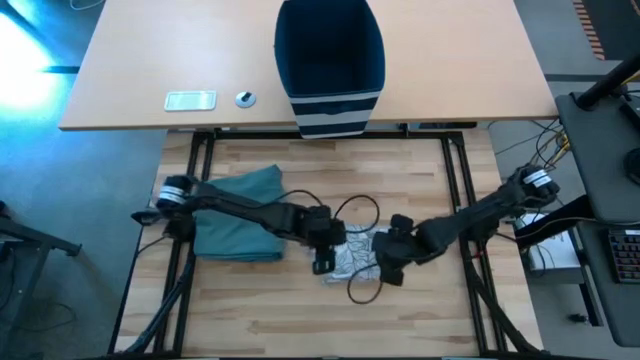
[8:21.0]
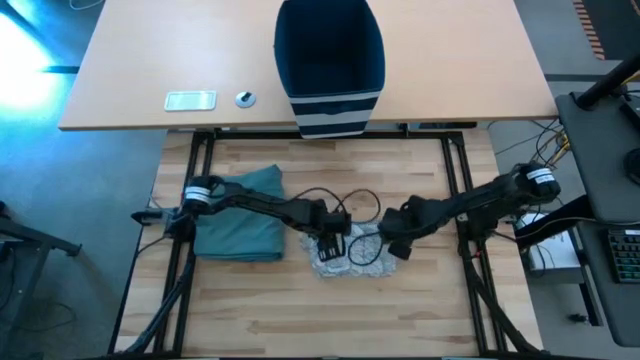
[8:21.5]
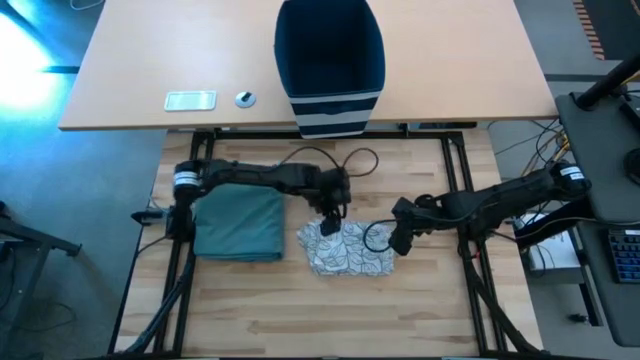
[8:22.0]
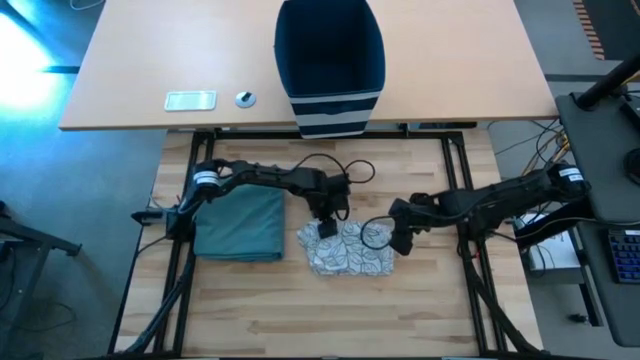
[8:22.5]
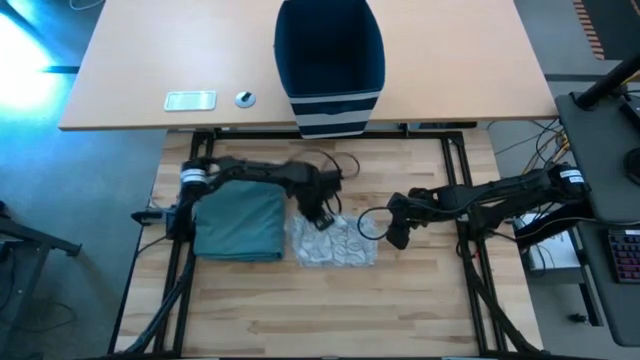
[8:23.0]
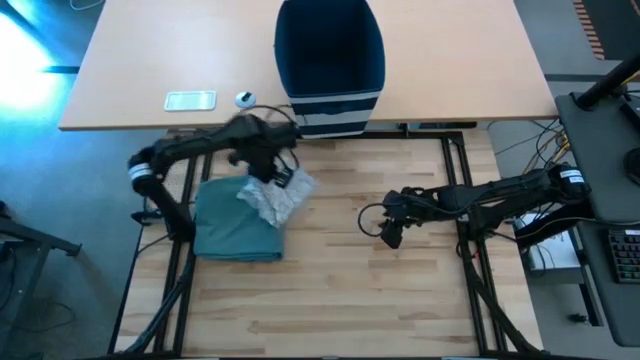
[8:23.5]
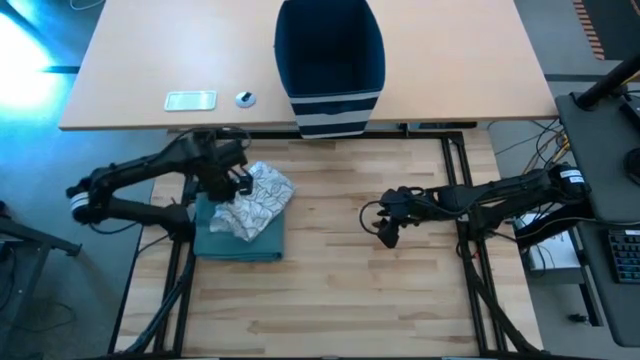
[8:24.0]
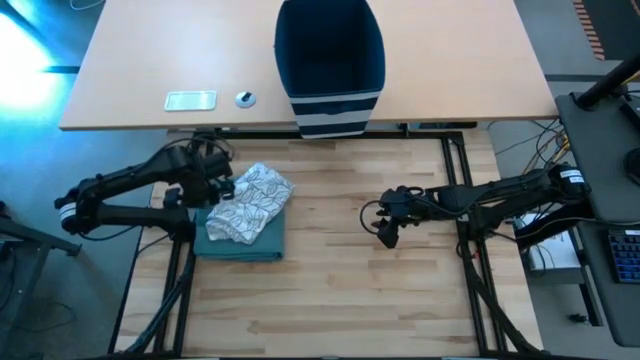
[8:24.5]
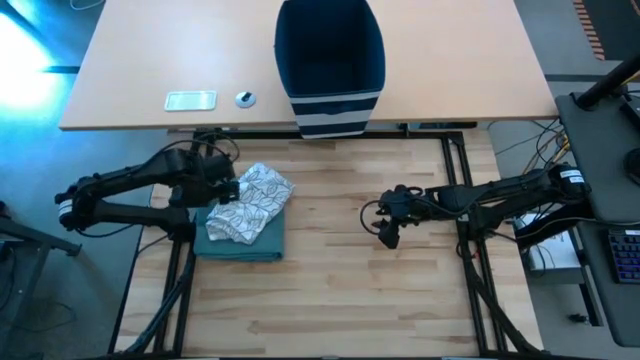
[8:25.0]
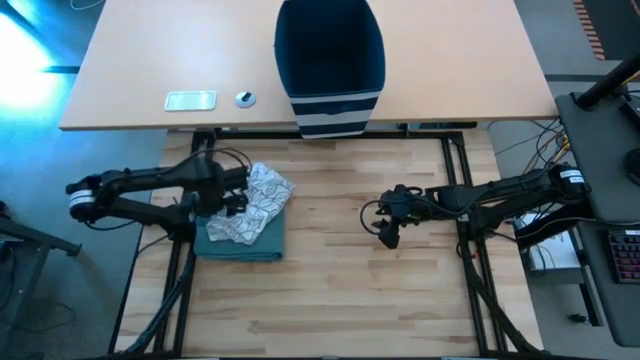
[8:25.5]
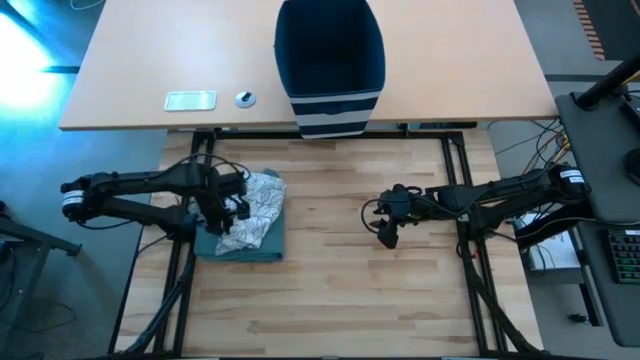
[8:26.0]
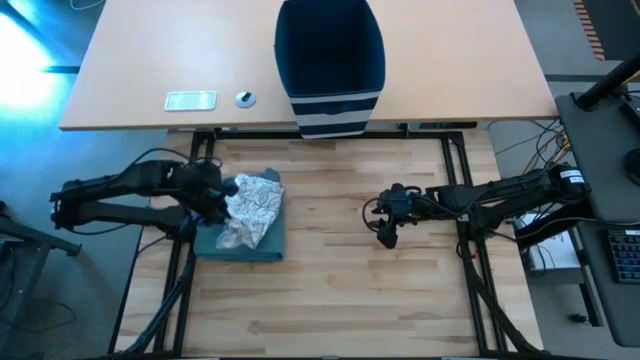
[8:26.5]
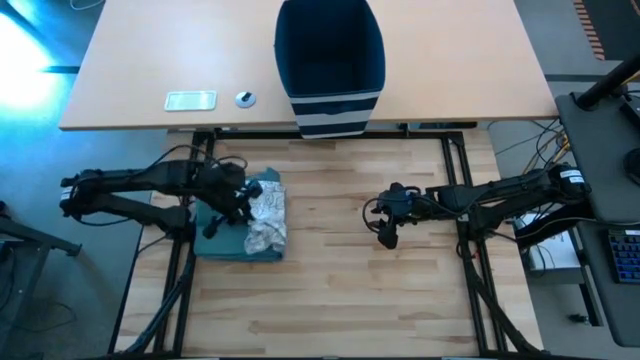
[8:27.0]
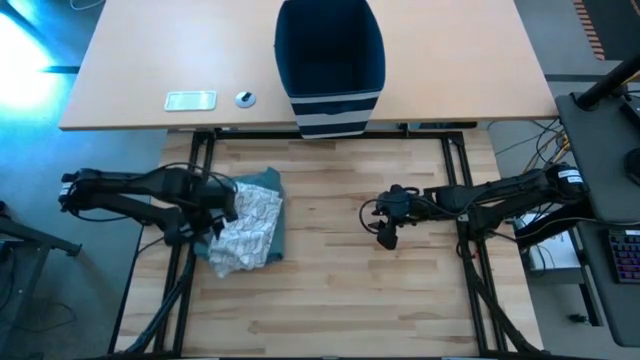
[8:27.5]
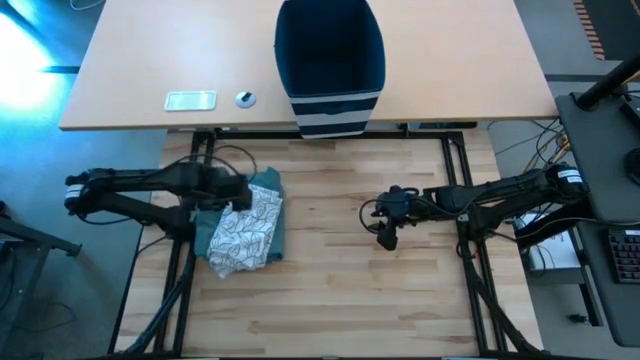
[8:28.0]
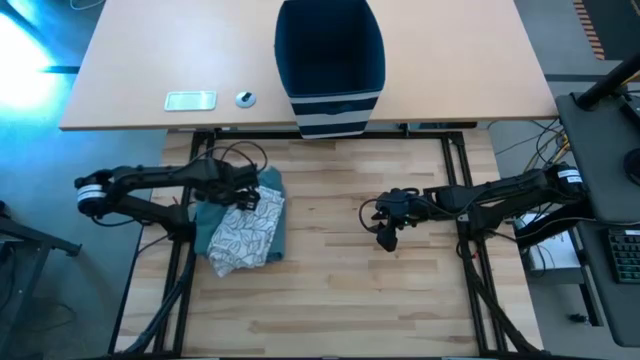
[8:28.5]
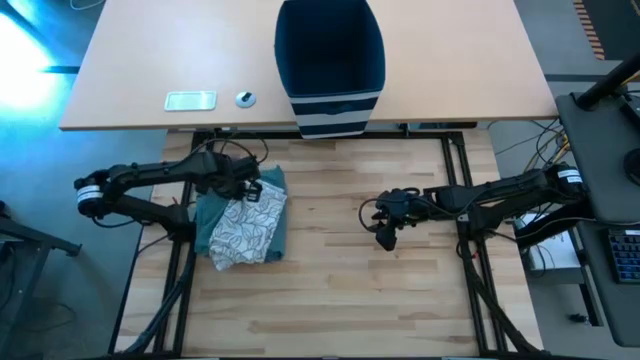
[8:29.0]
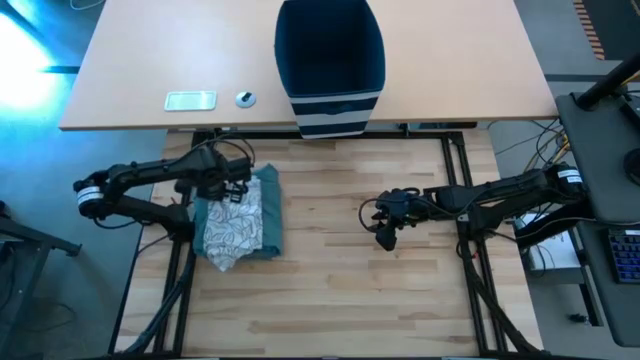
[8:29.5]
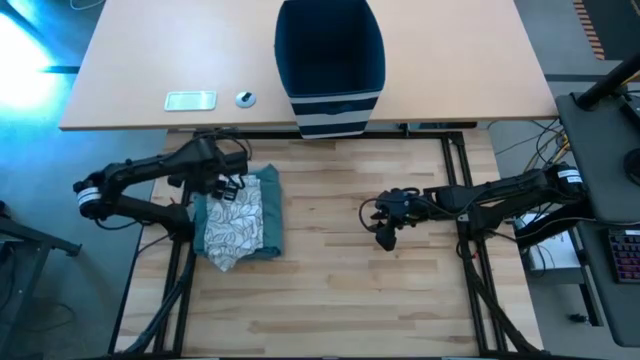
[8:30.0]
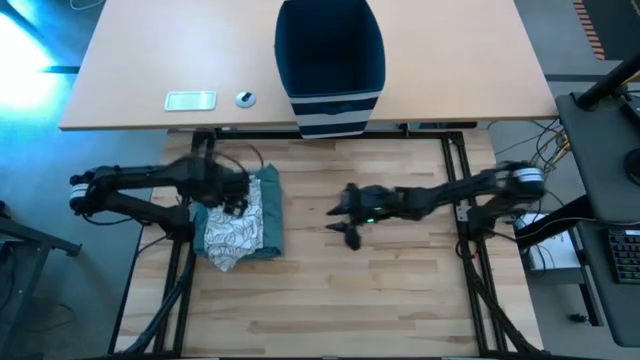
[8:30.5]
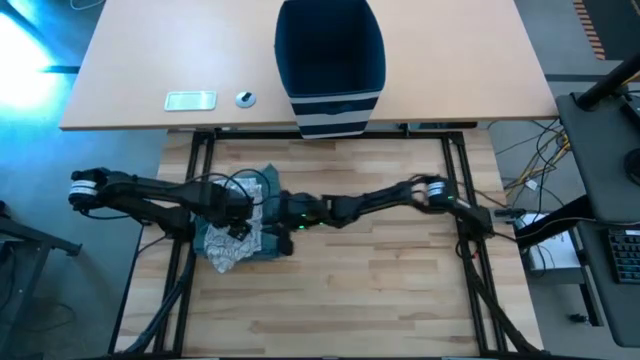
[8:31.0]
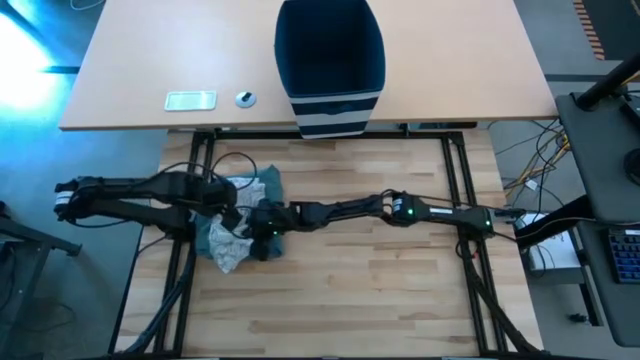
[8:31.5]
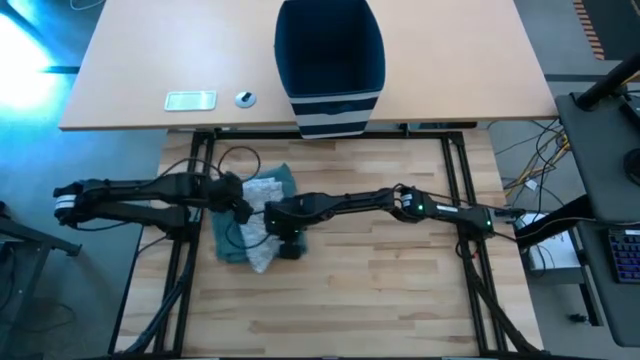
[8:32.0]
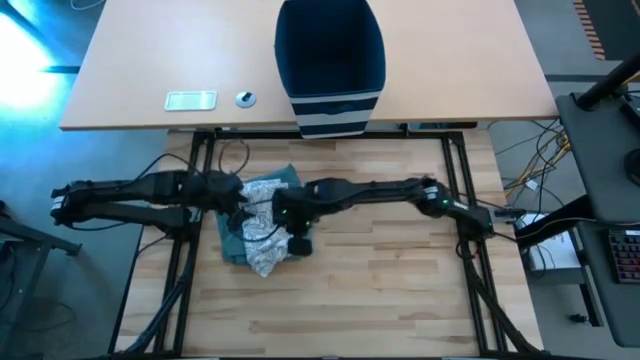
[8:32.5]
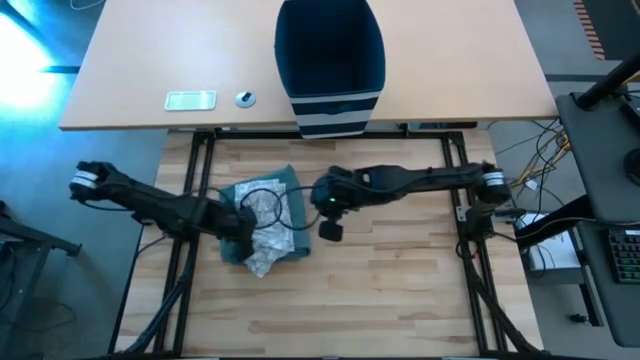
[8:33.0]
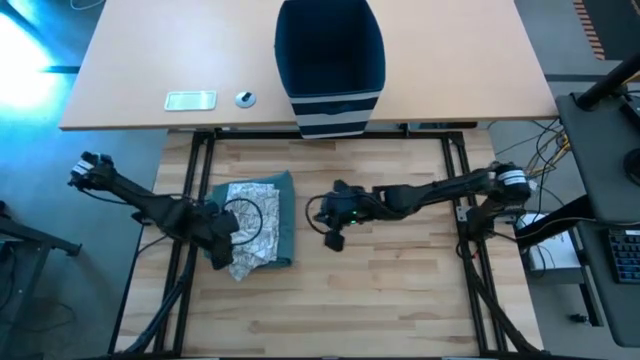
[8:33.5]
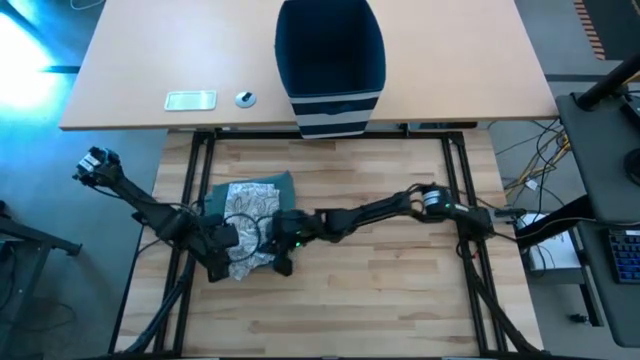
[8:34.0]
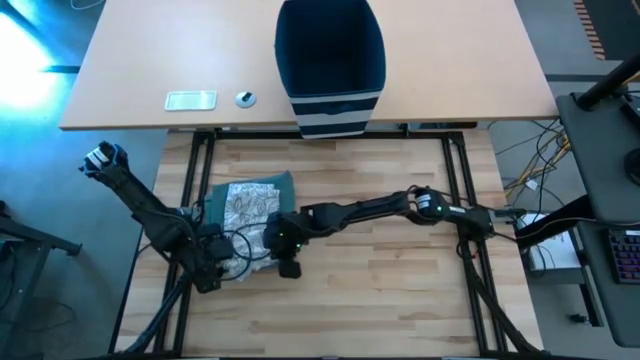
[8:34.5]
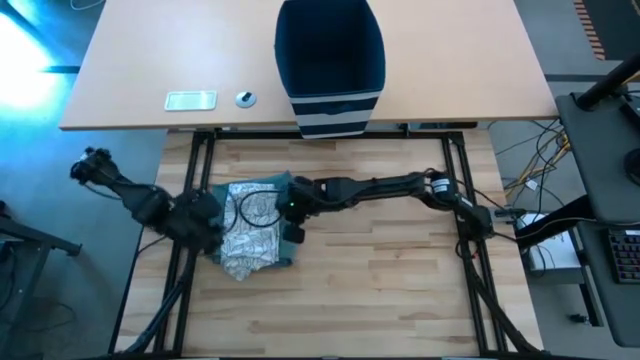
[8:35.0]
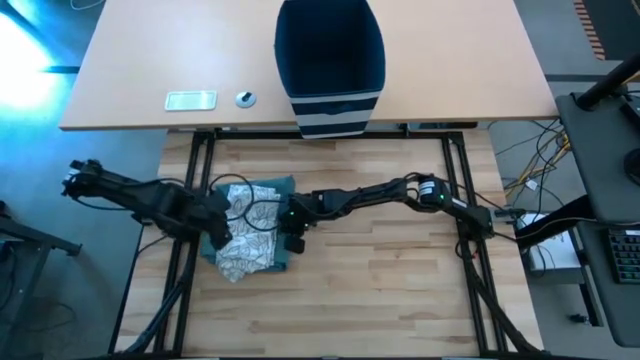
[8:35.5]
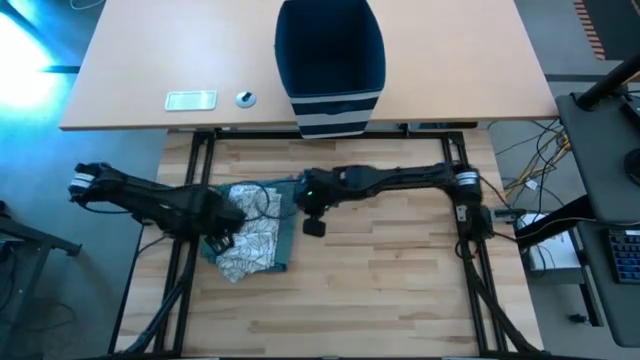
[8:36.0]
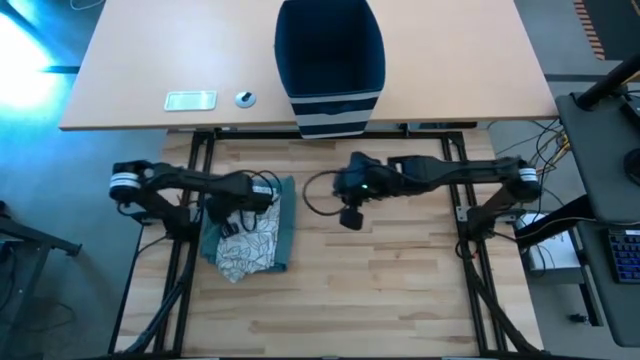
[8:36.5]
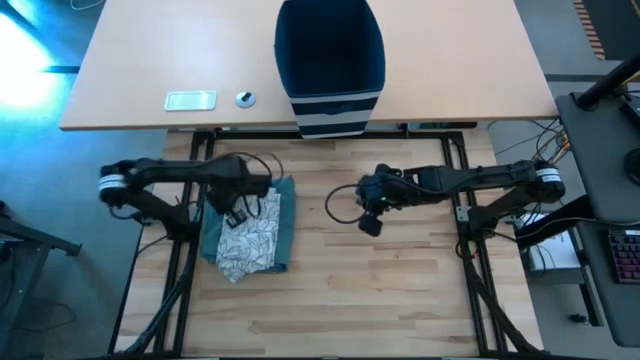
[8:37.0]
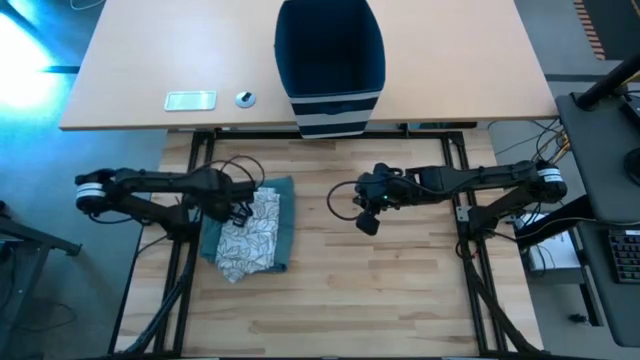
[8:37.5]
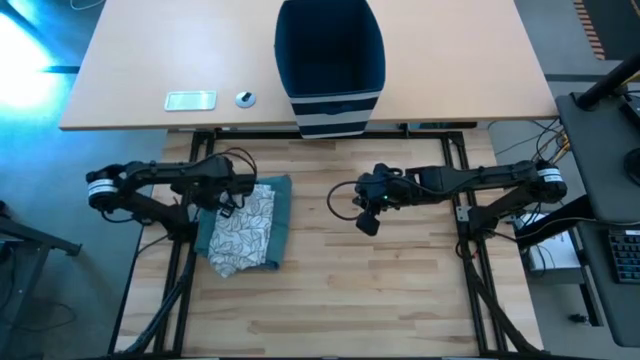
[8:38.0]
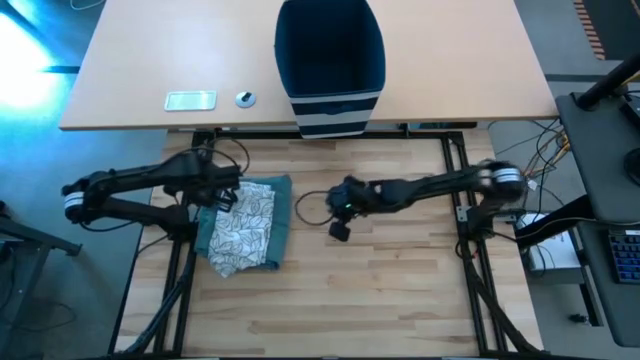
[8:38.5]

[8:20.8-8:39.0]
Task: Fold Laundry from Bin
Fold the white shirt

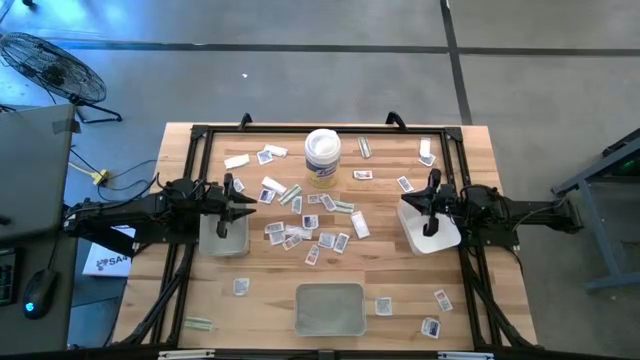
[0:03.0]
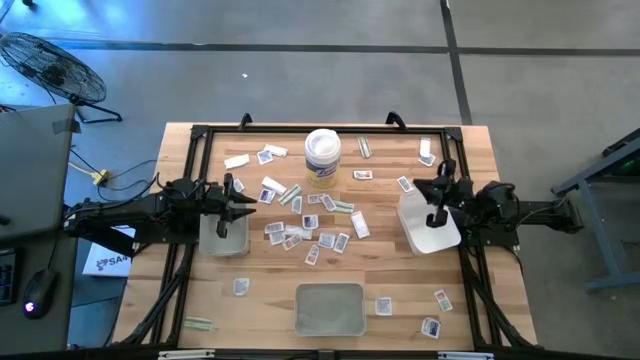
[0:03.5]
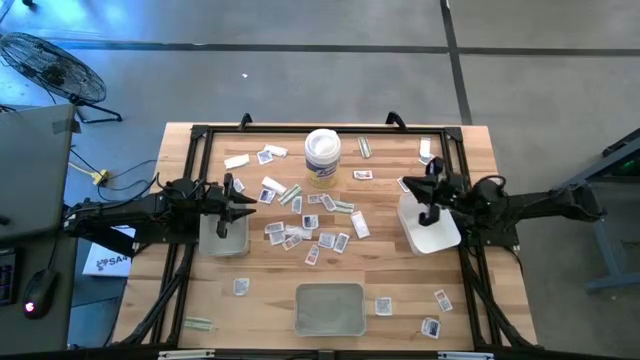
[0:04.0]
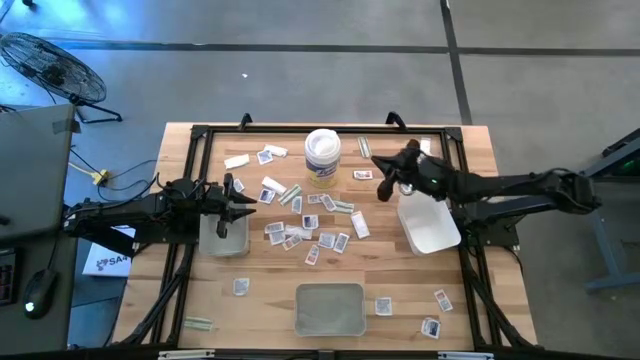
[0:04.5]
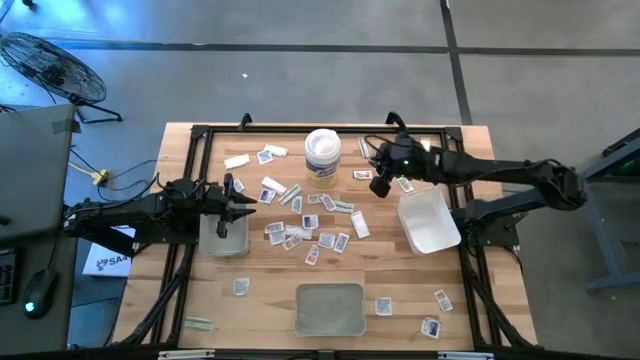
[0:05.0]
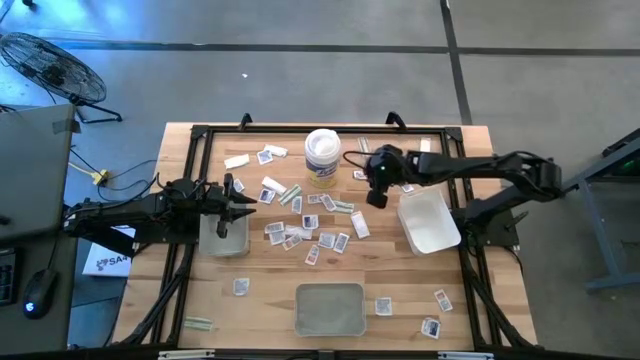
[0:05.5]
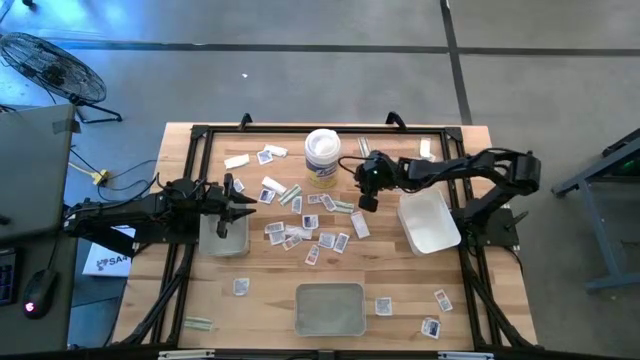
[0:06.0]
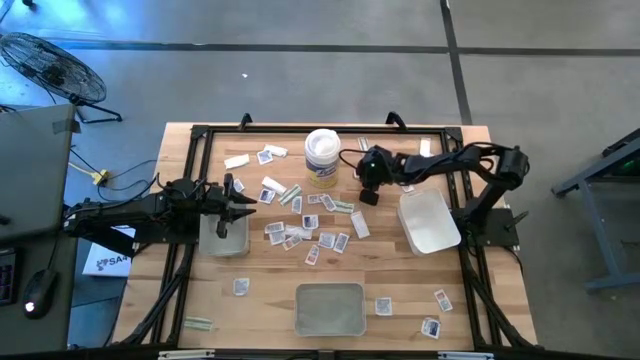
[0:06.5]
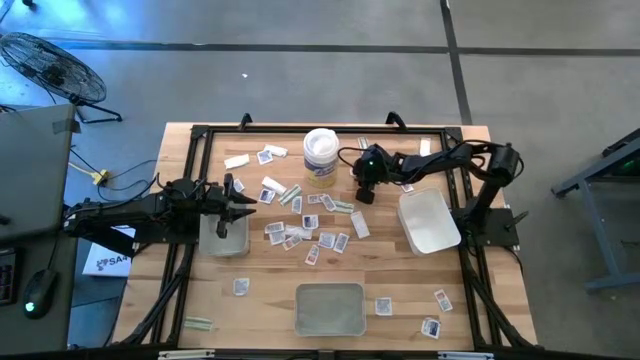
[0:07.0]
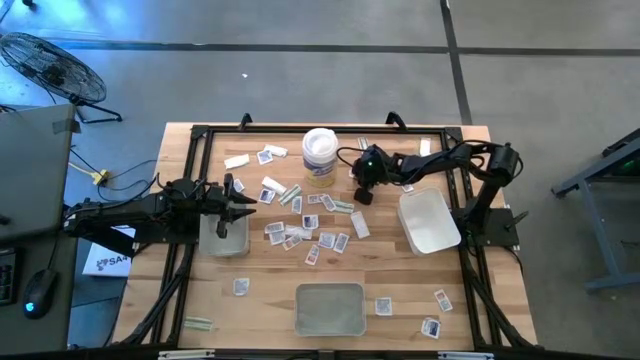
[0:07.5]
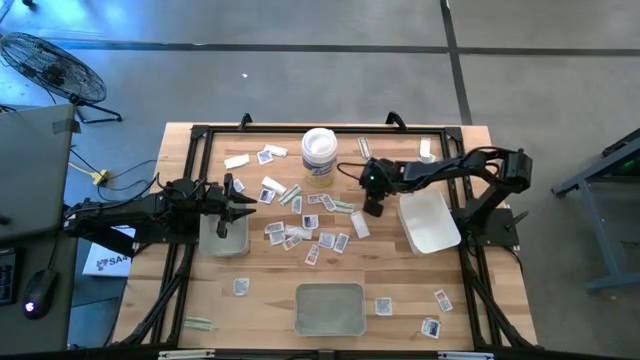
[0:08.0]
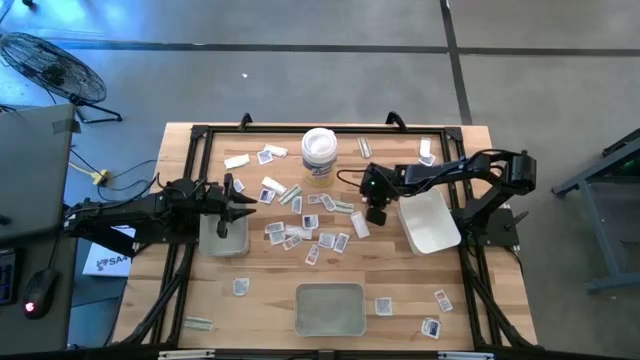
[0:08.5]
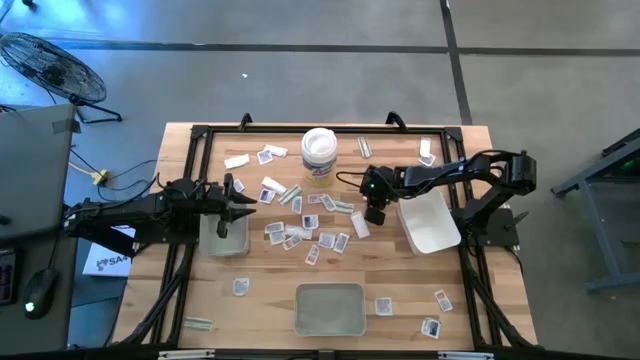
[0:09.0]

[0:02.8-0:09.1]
Task: Pick & Place First Aid Supplies
Put the orange ointment pack into the white bin
